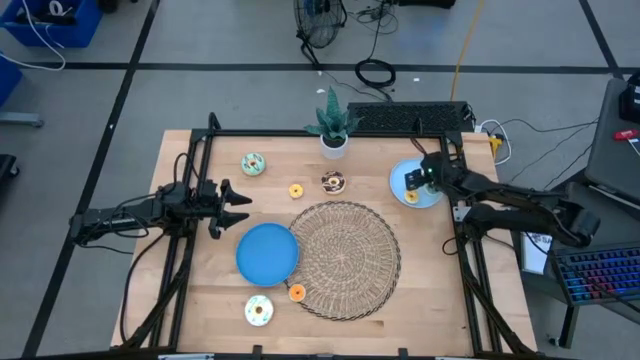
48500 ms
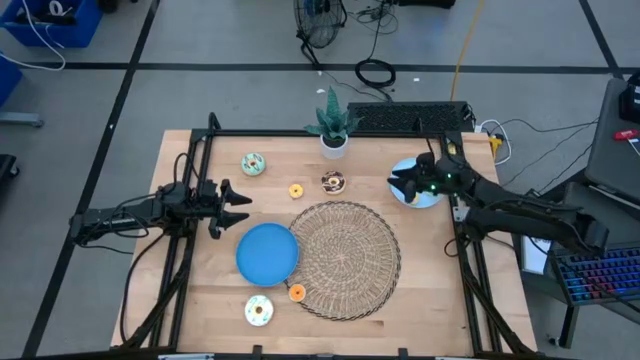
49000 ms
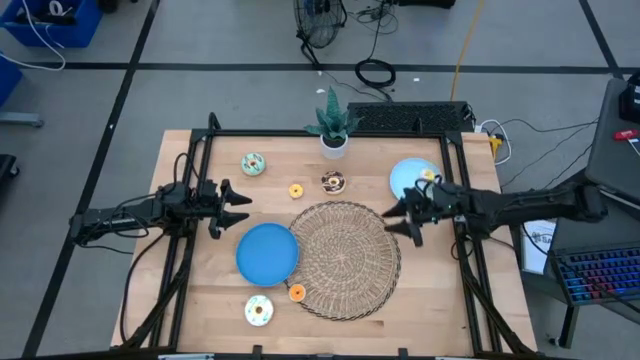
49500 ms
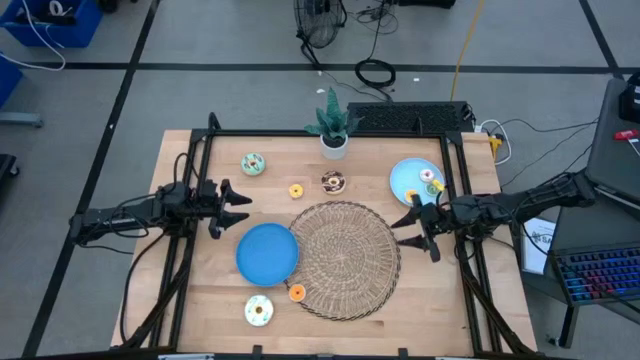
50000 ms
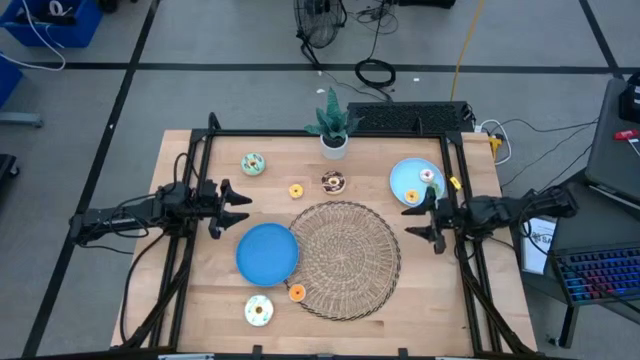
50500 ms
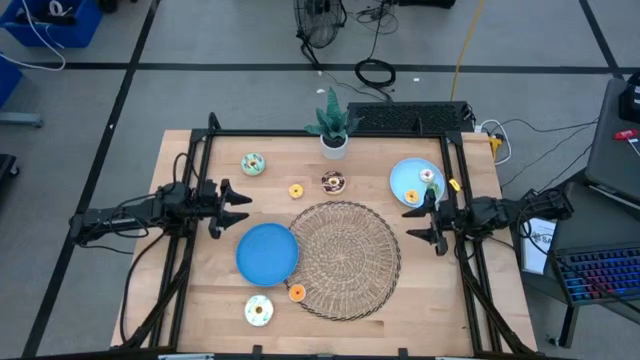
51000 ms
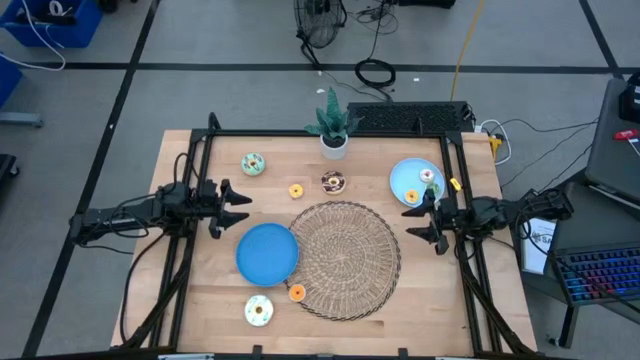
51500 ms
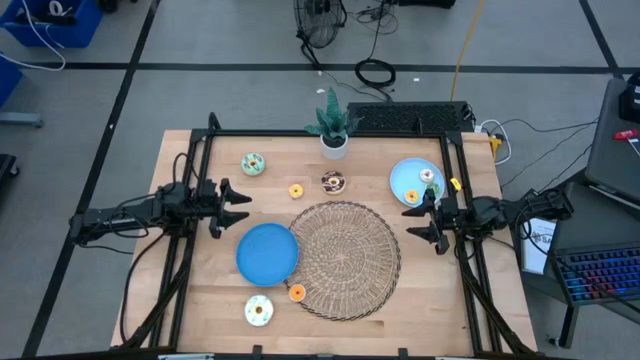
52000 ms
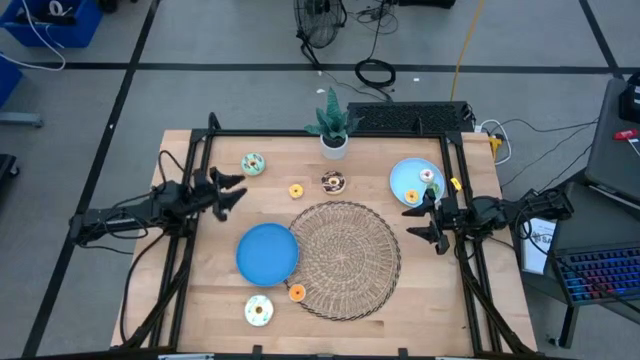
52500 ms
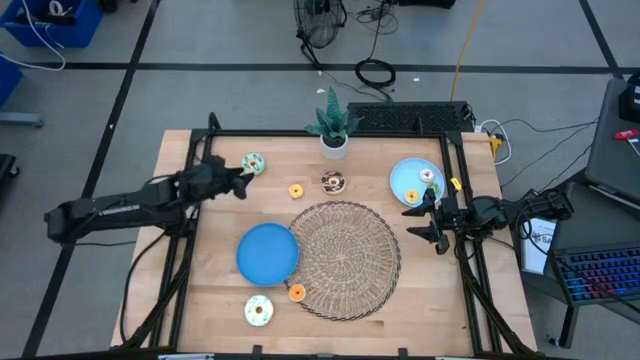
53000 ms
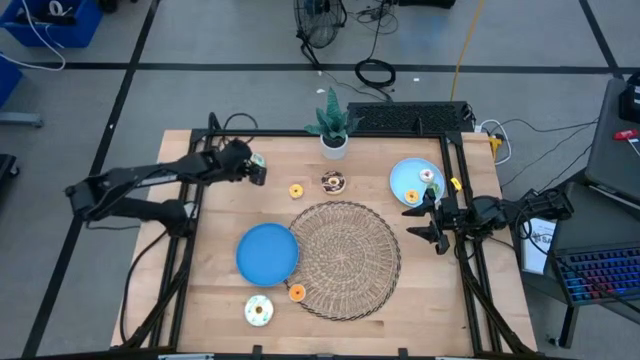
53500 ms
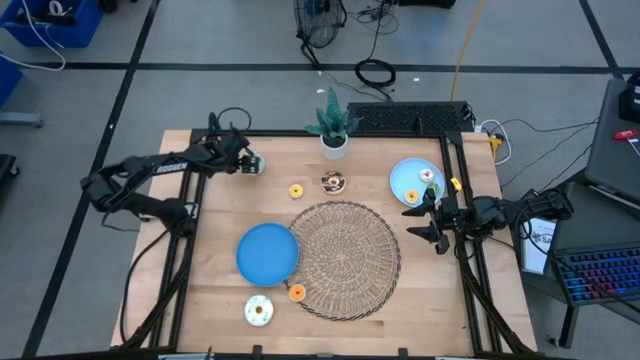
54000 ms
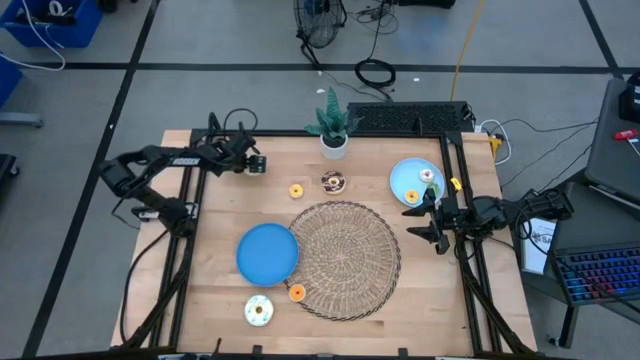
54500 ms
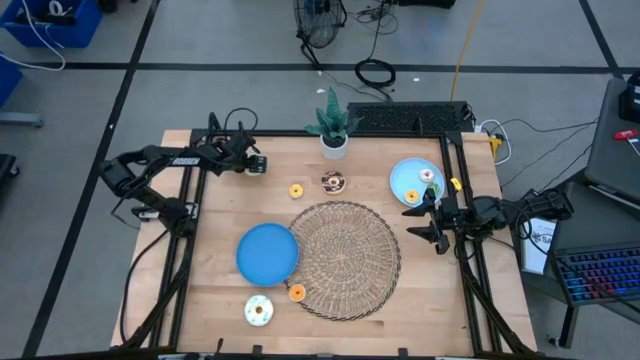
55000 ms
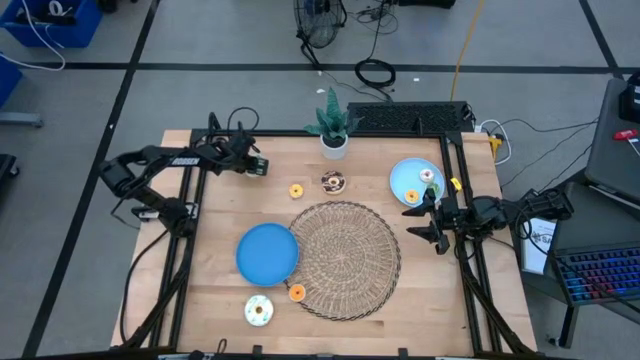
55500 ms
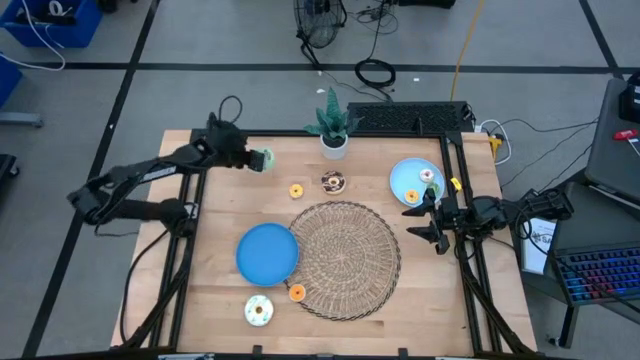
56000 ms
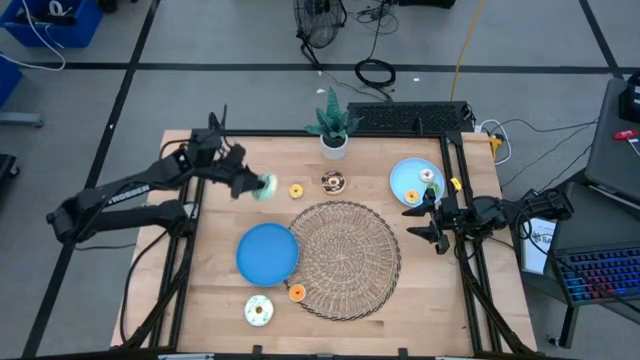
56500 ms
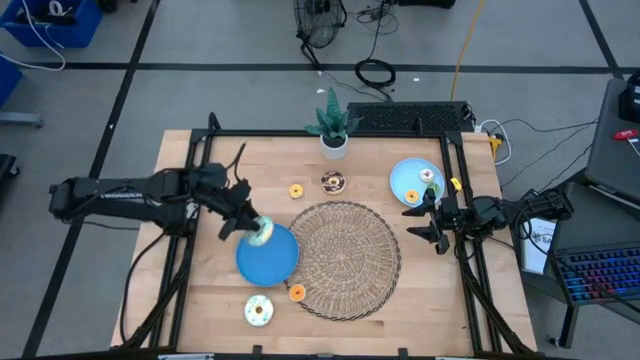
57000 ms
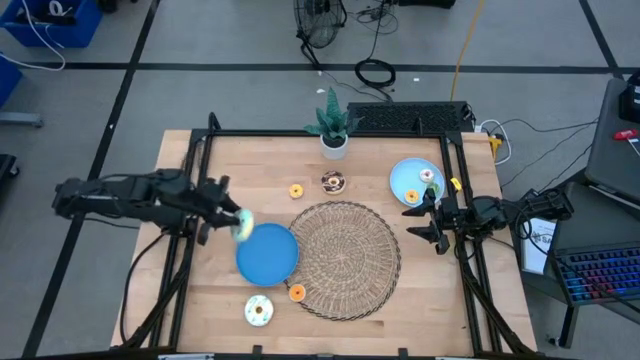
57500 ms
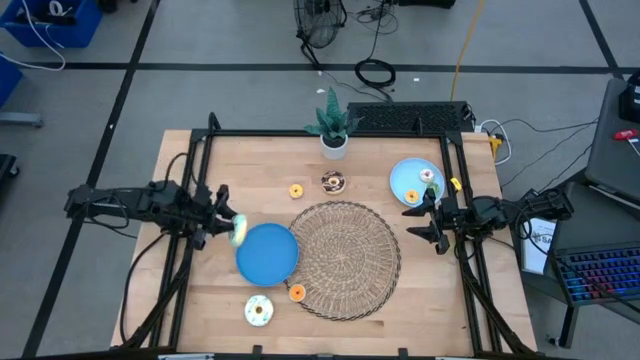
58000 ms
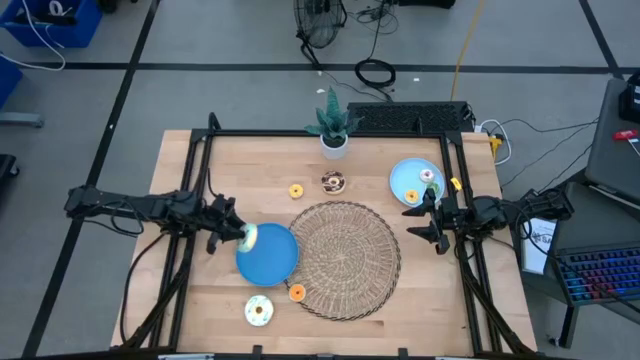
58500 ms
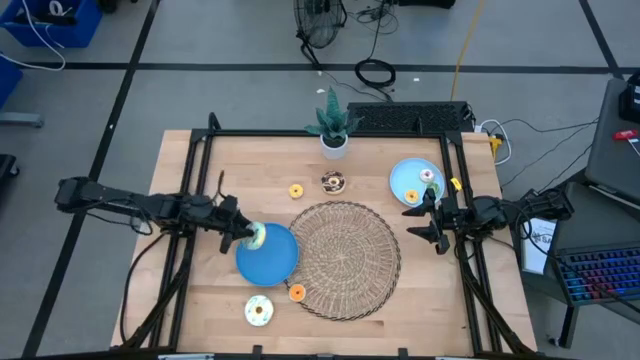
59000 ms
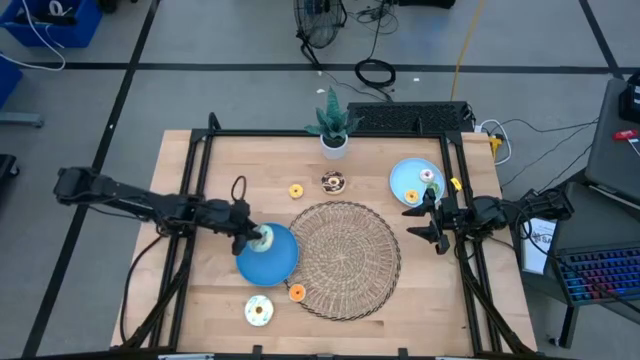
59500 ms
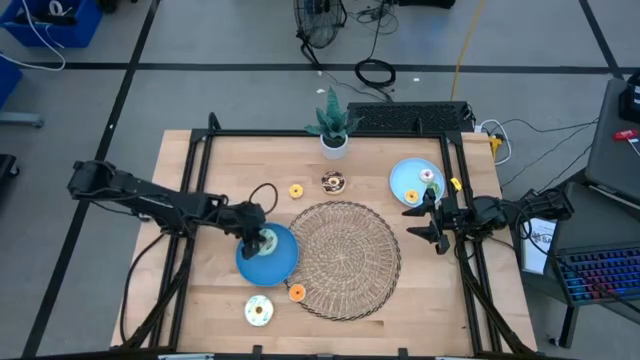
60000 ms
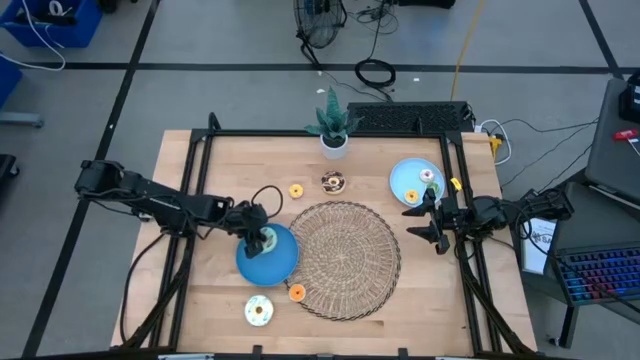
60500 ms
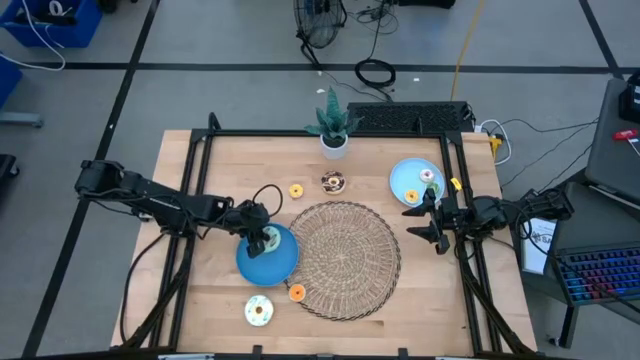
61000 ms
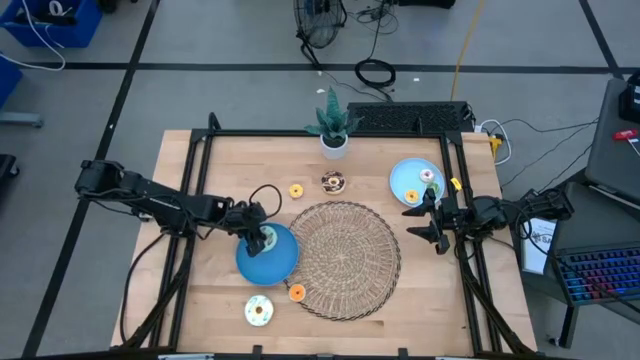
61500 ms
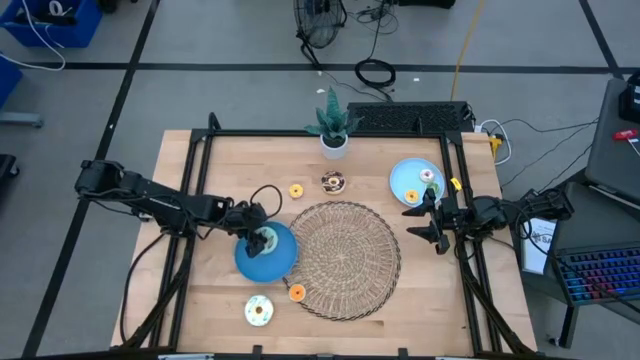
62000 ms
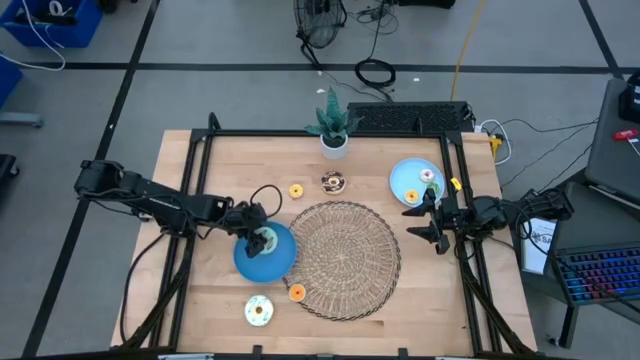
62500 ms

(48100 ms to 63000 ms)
Task: Pick & Place donuts
Put the large light blue donut on the blue plate

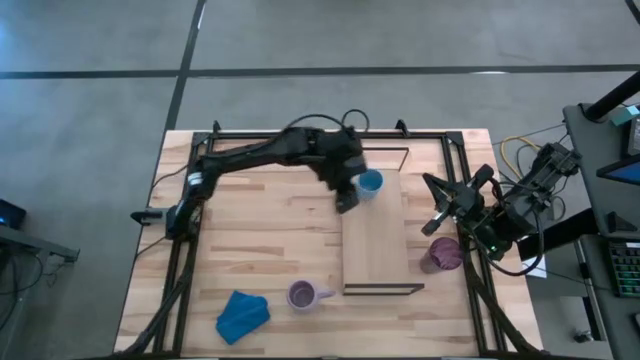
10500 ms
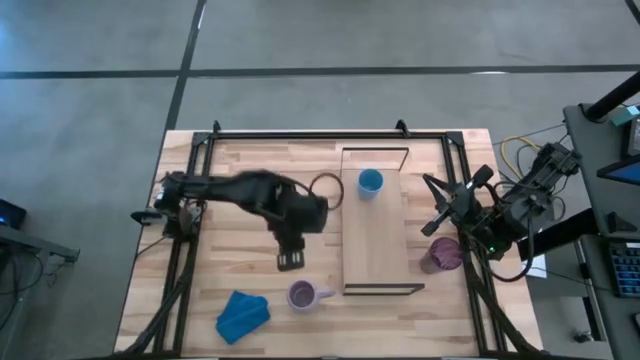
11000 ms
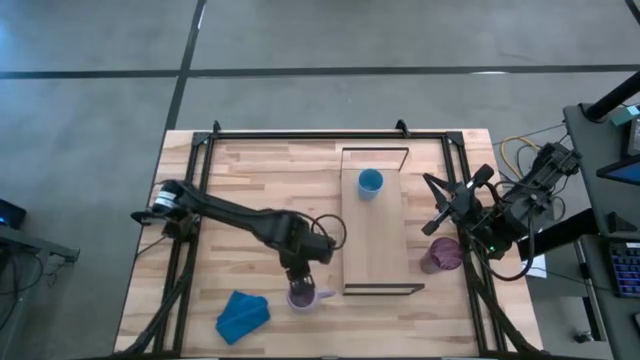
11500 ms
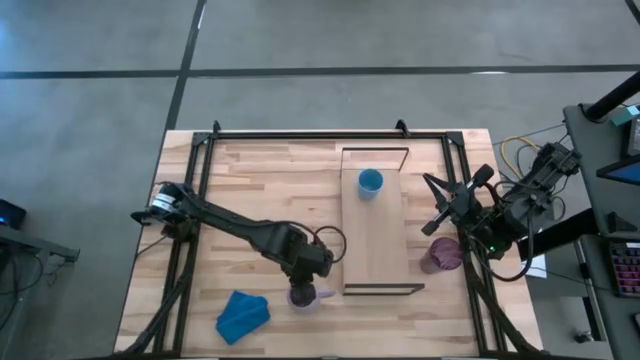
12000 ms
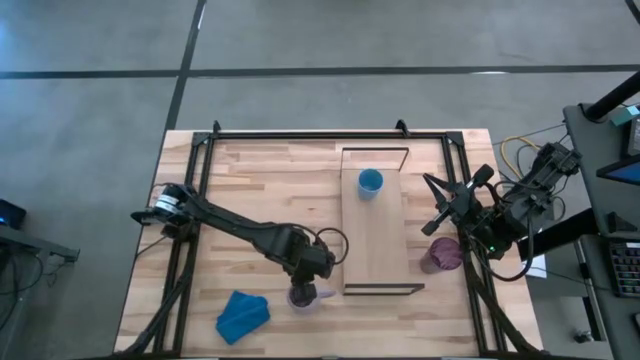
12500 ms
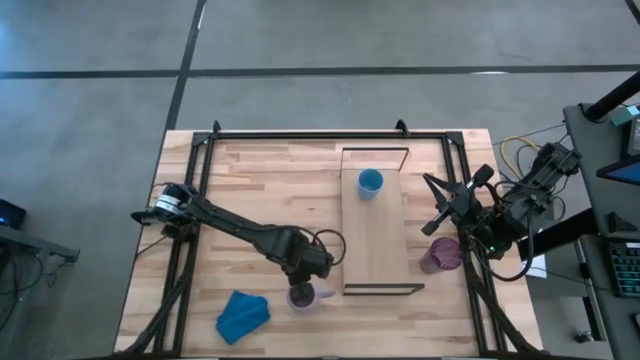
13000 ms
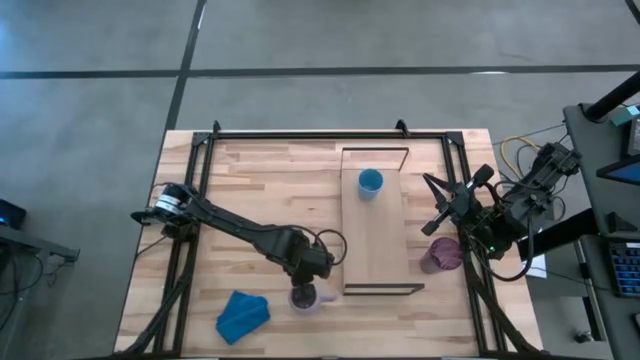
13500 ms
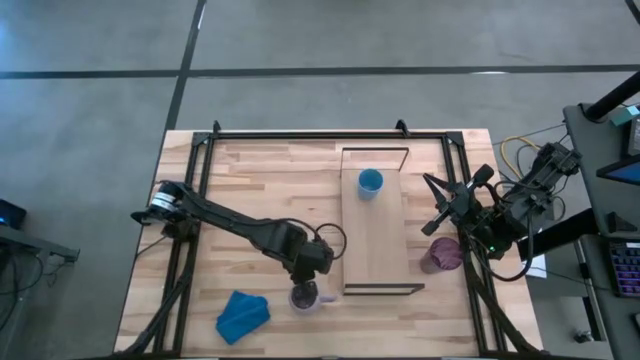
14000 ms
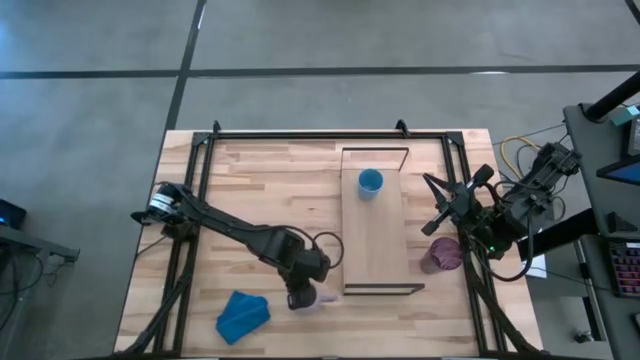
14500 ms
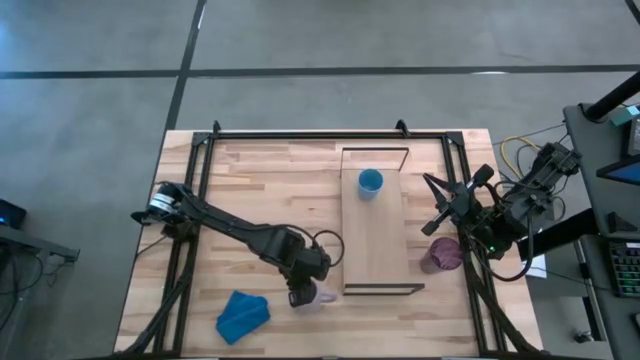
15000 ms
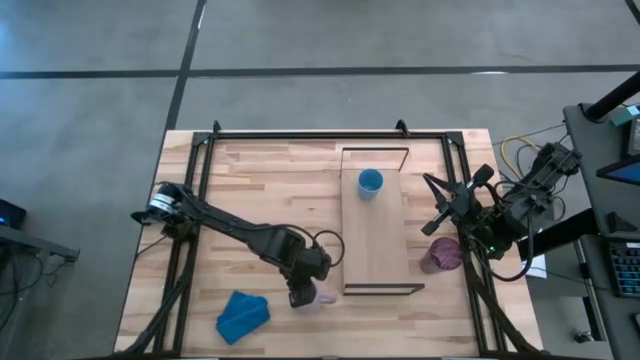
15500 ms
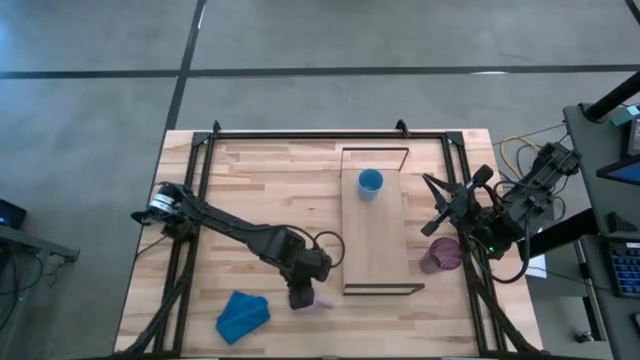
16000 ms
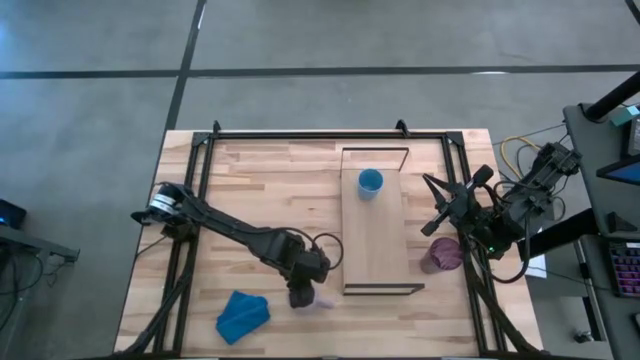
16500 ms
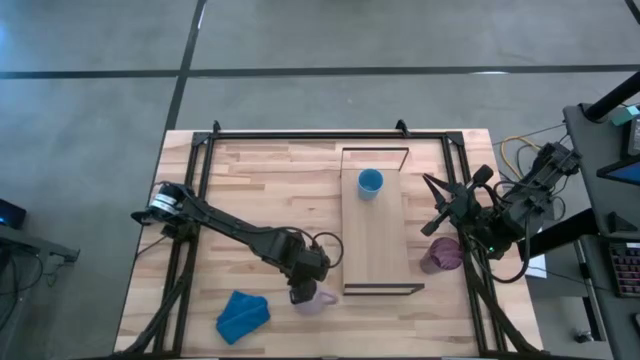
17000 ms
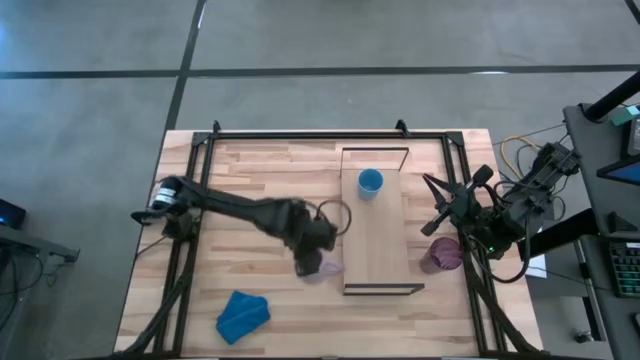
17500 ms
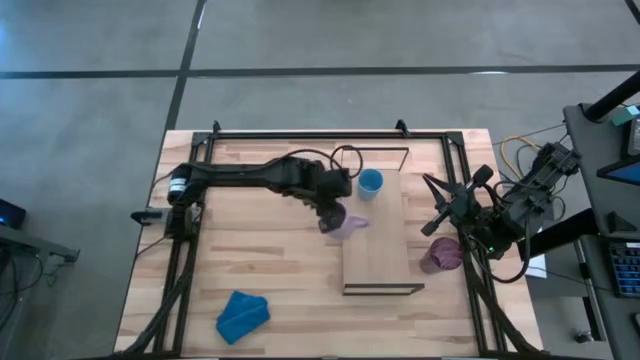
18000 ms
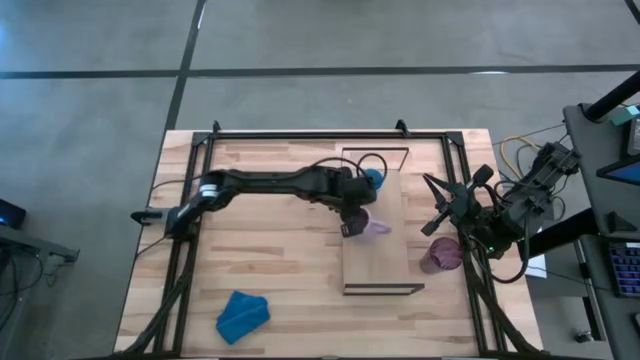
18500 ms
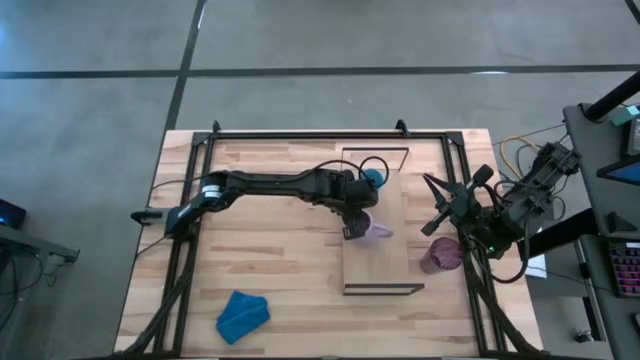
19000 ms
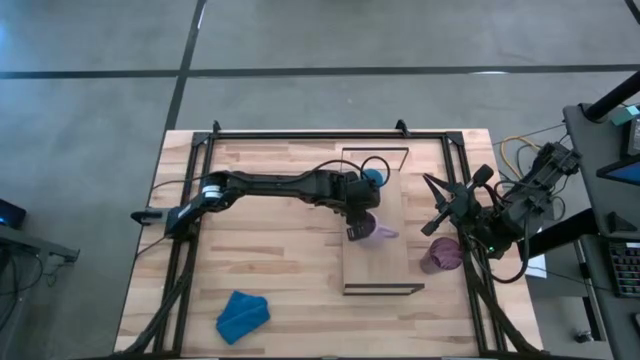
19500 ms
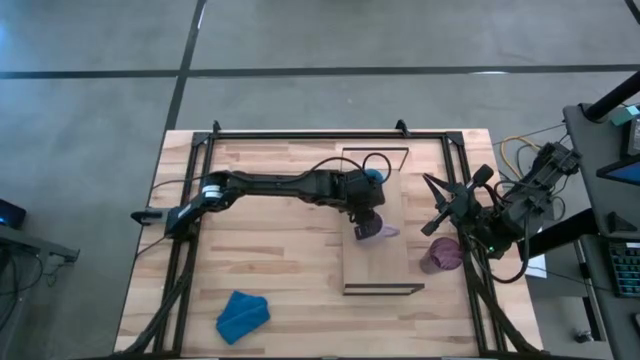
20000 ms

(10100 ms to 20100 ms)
Task: Stack small to large cups/mugs on shelf
Put the purple mug on the shelf
